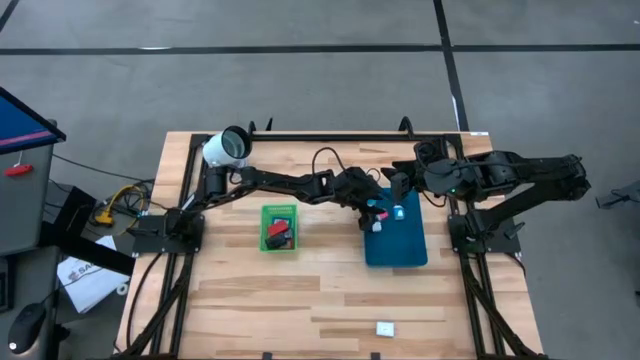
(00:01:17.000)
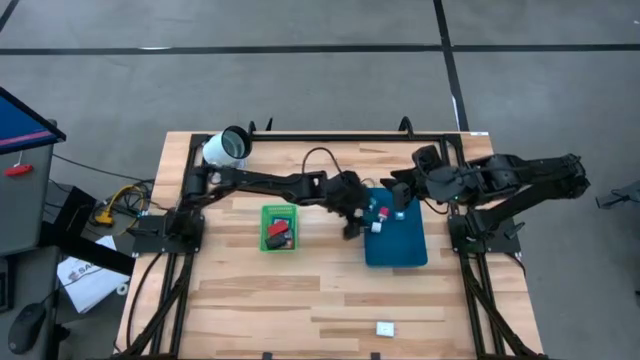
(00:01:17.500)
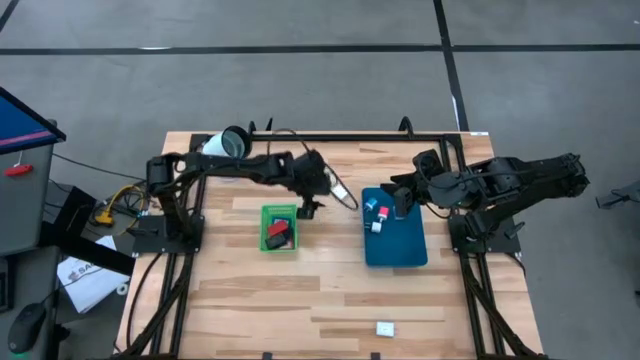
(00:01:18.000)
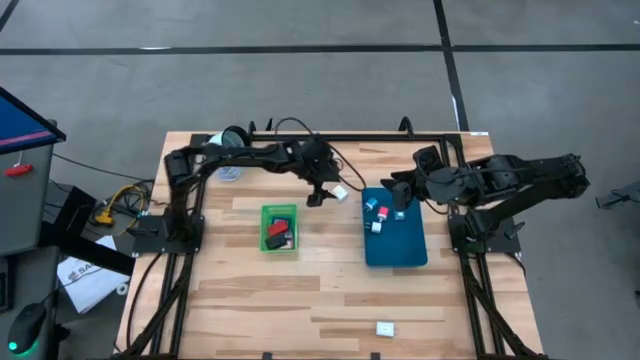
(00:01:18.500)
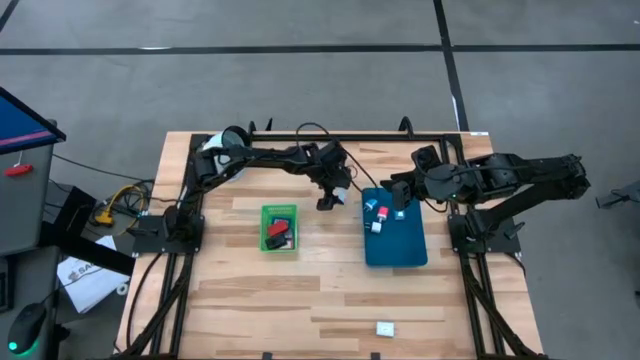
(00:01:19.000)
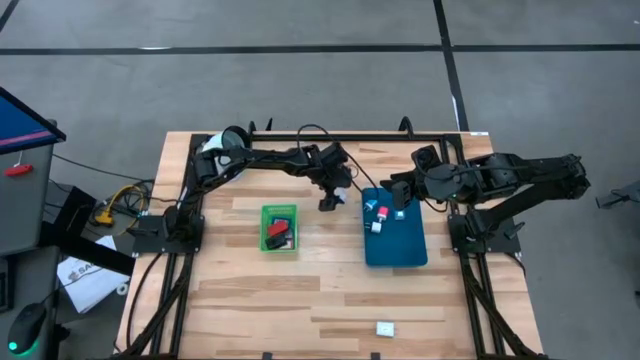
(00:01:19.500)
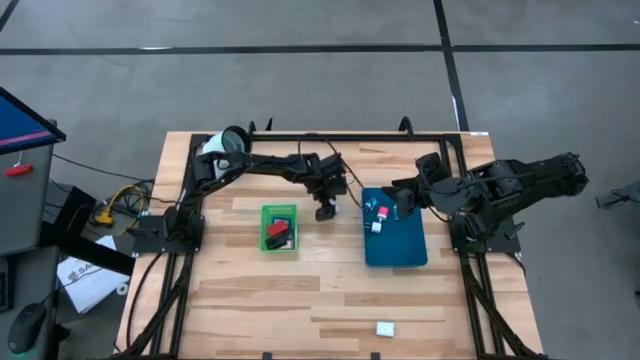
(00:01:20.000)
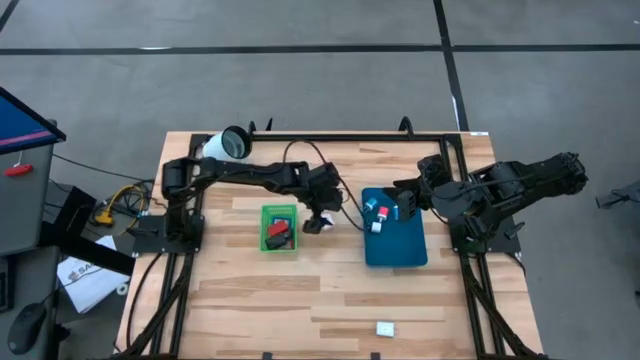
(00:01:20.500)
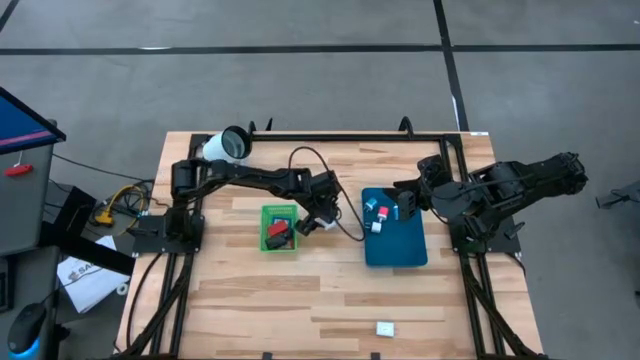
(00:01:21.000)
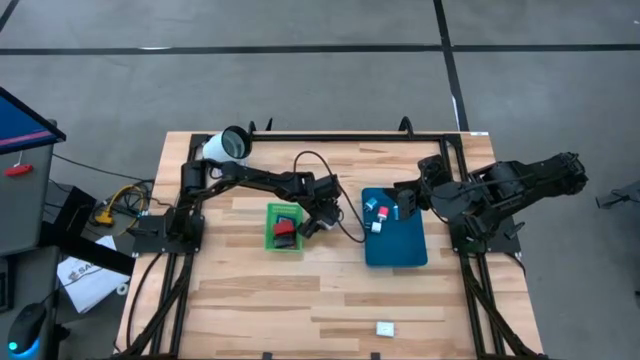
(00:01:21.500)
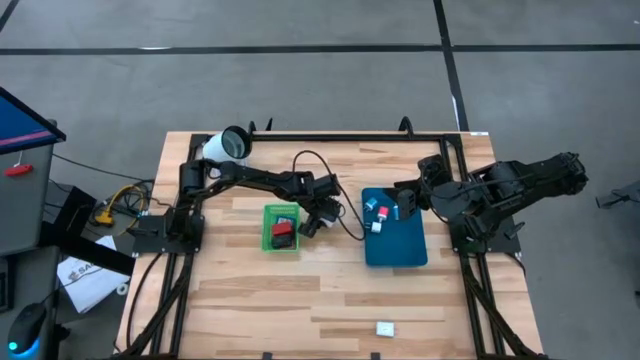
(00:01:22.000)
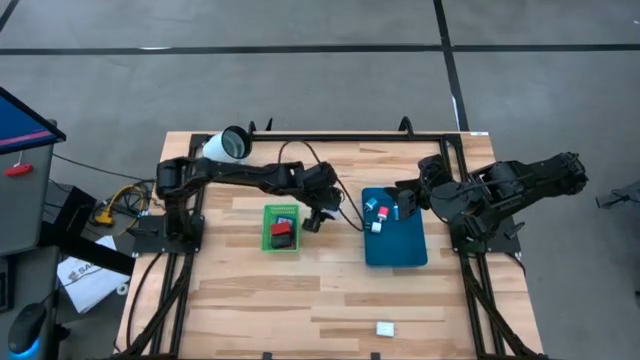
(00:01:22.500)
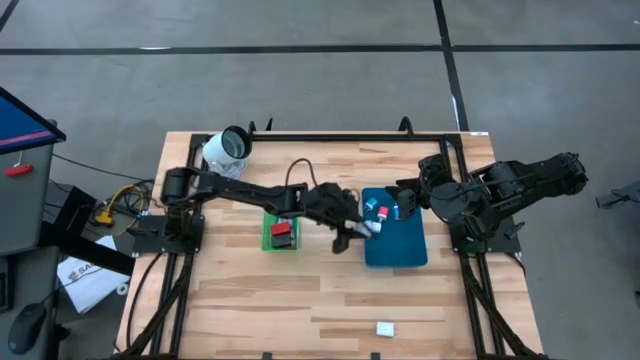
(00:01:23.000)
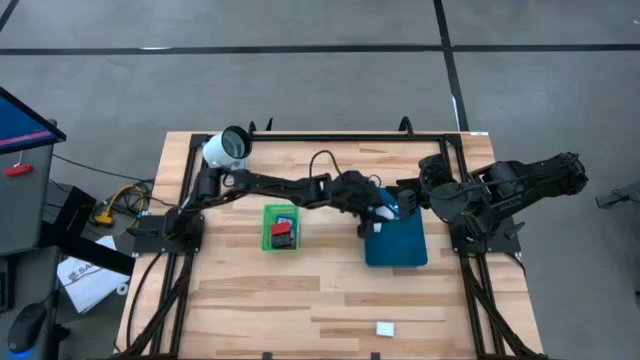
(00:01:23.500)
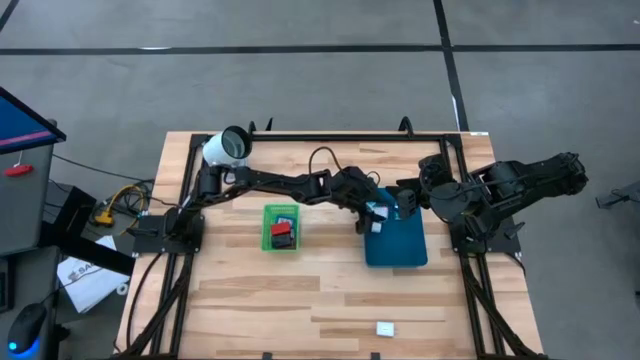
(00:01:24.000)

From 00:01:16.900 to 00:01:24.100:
Task: Pick & Place Office items
Put the top white charger adapter into the blue bin

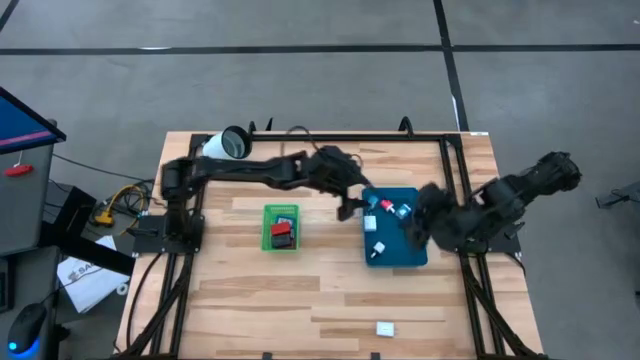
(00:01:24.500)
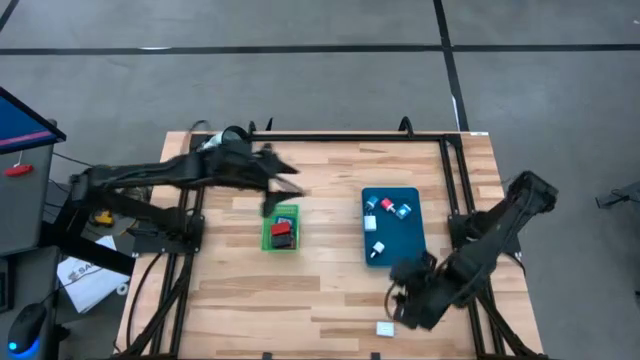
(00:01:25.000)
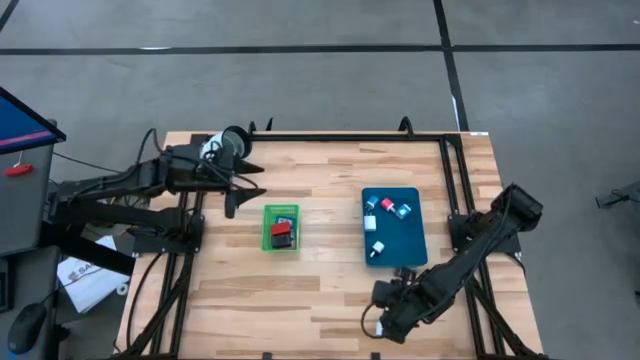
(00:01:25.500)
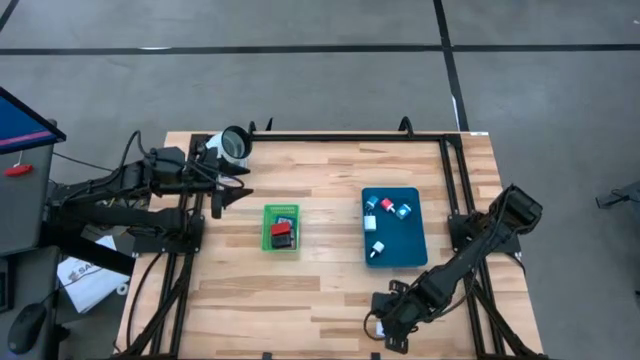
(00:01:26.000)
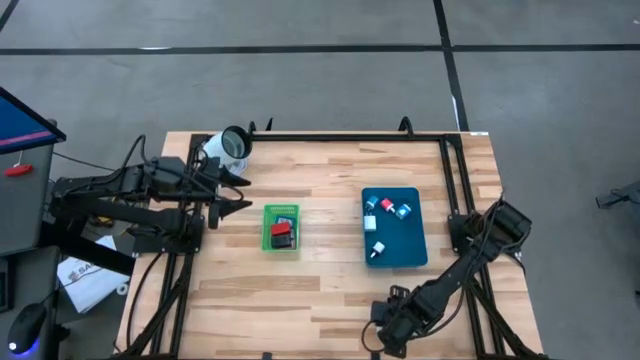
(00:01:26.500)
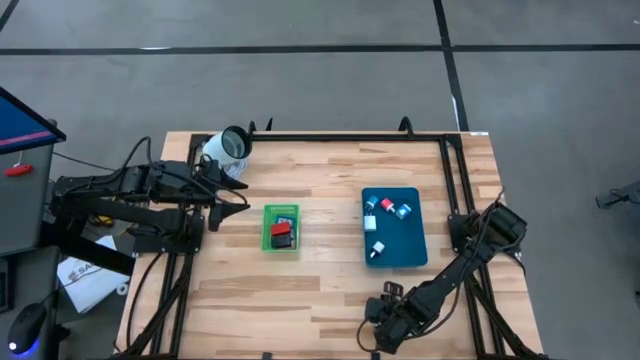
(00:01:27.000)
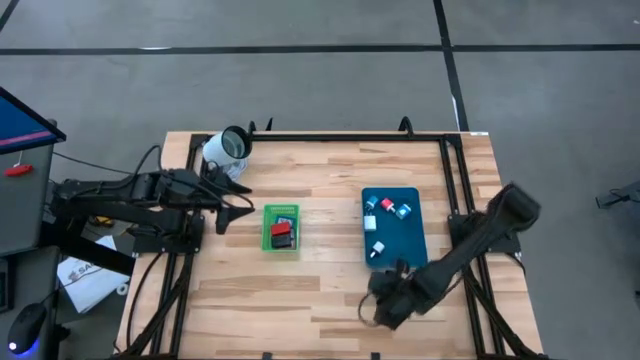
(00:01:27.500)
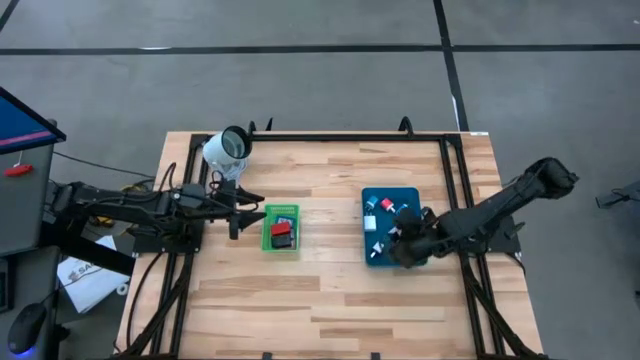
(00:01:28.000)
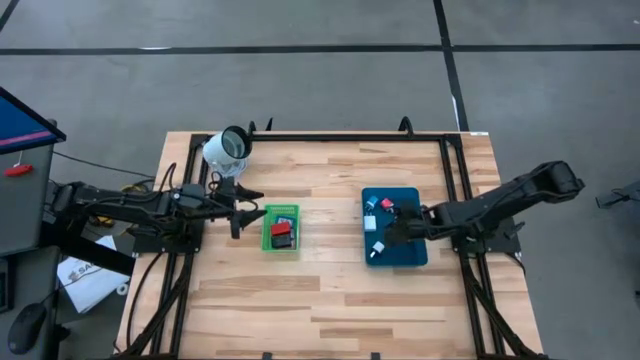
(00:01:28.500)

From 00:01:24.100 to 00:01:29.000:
Put the white charger adapter into the blue bin

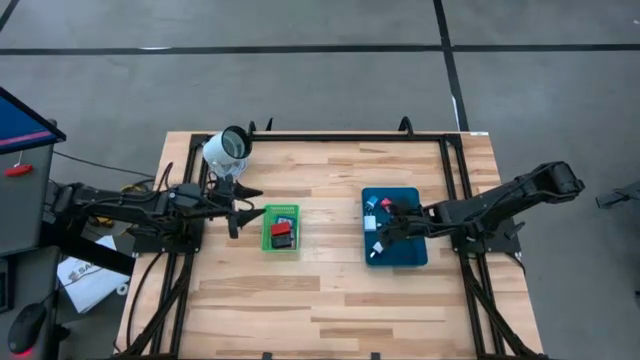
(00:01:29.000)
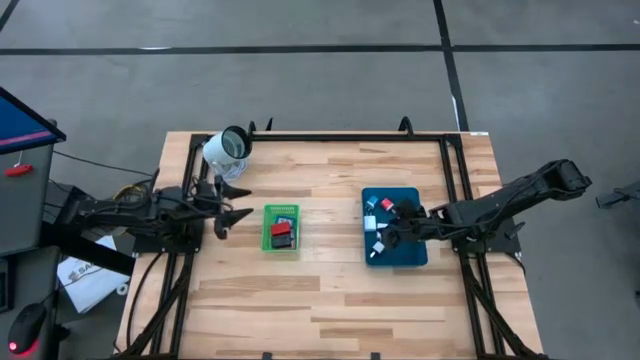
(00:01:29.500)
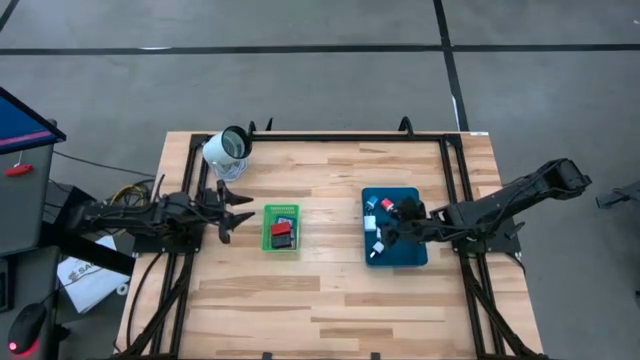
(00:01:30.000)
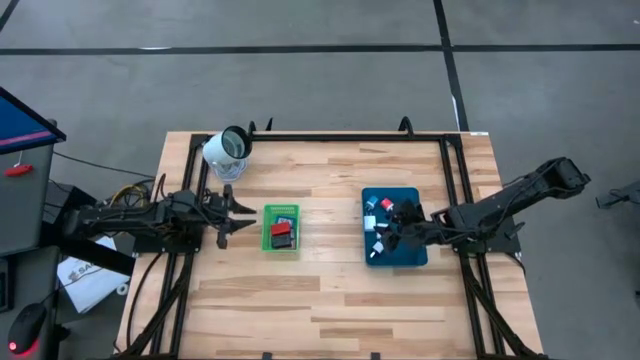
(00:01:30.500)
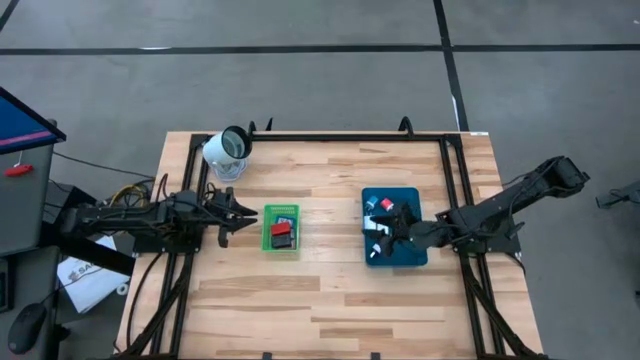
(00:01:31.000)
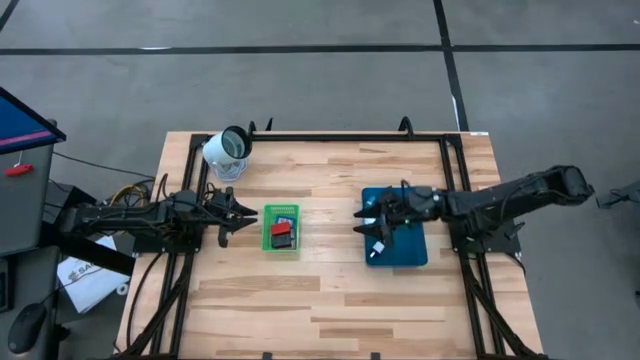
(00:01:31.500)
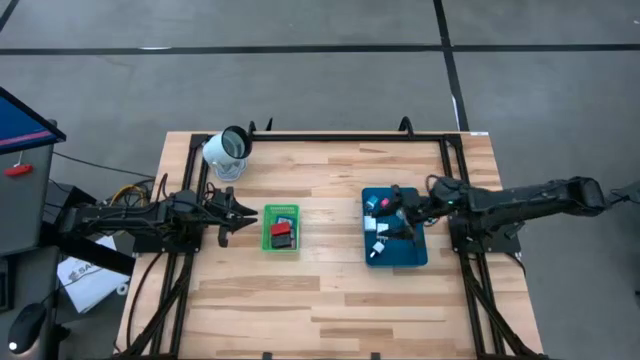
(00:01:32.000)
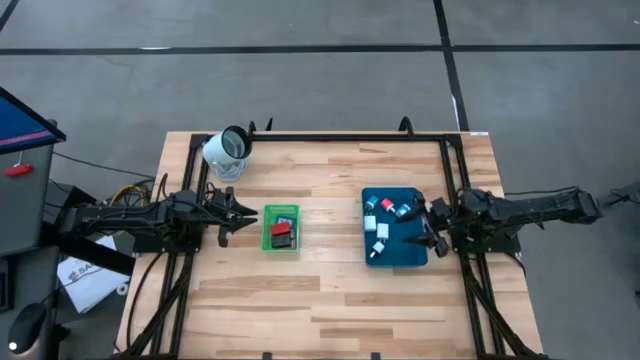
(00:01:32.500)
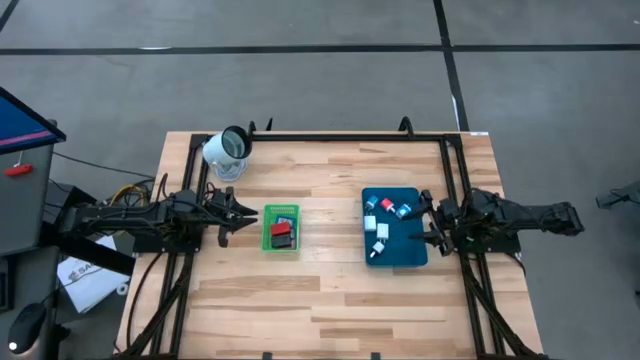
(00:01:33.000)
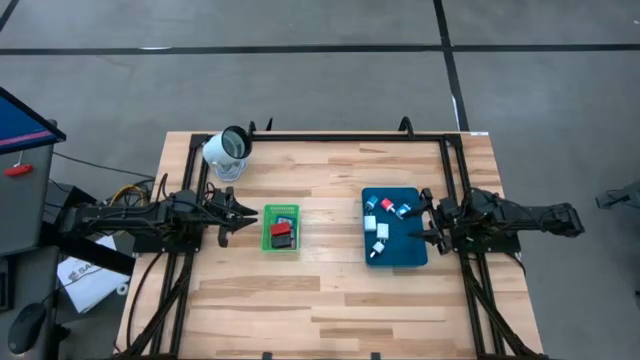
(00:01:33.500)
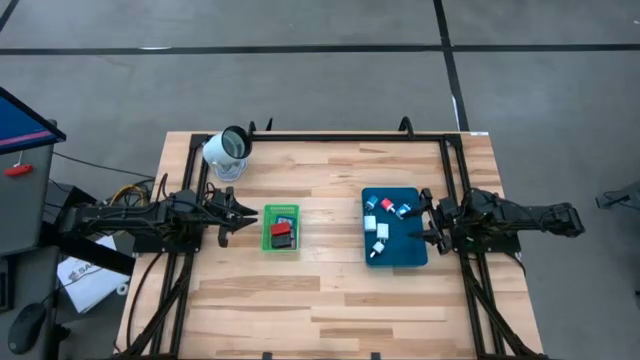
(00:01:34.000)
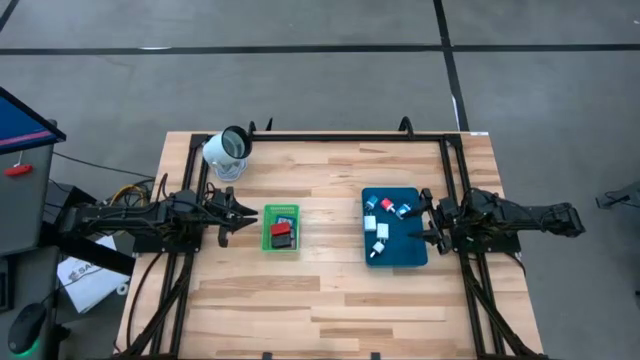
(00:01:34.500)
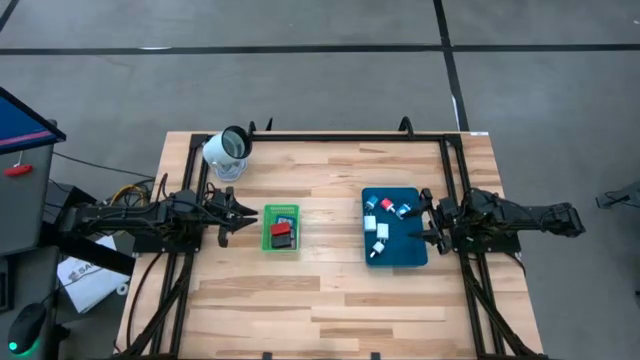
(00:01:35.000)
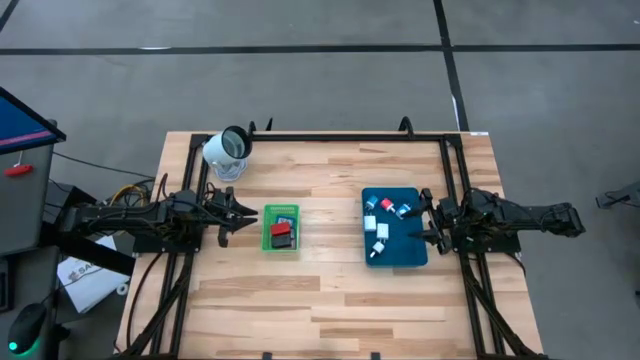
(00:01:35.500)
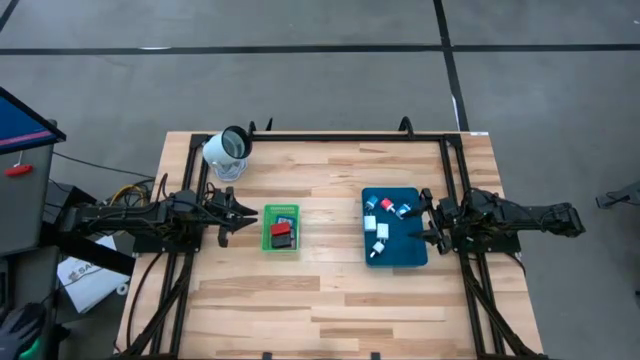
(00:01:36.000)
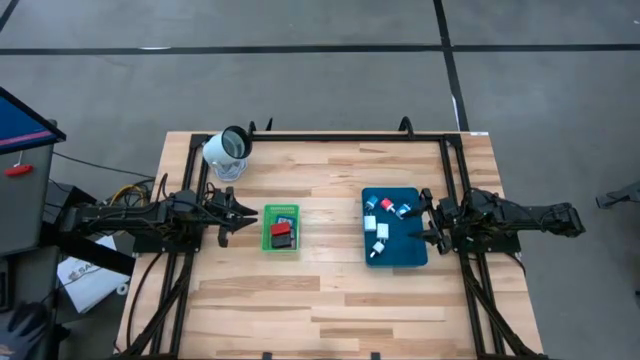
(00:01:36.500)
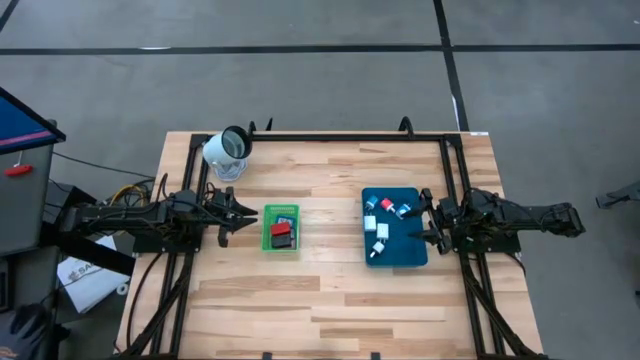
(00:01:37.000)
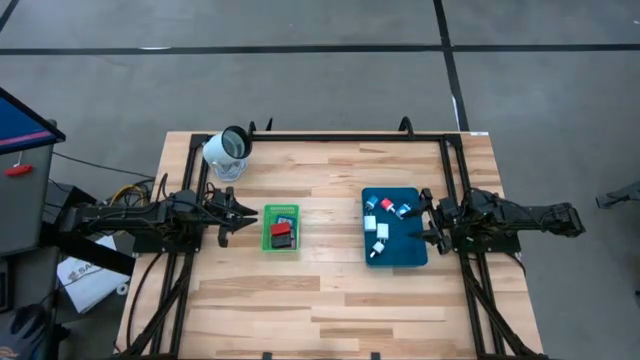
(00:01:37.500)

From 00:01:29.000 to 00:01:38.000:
Return to Home Position

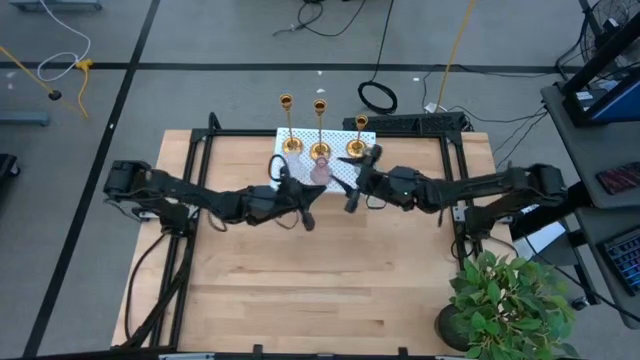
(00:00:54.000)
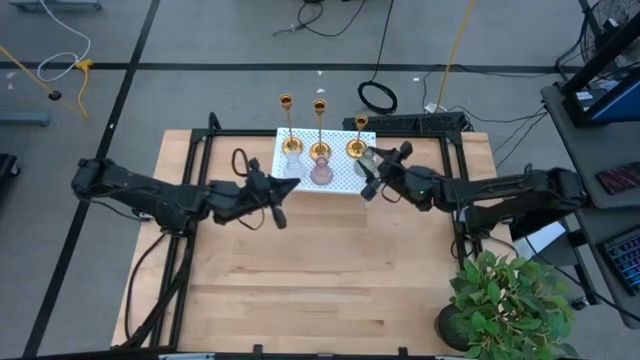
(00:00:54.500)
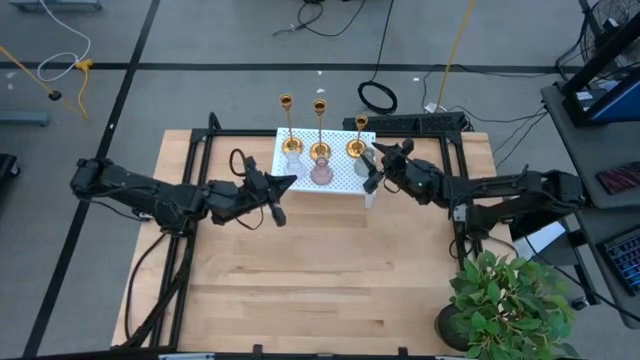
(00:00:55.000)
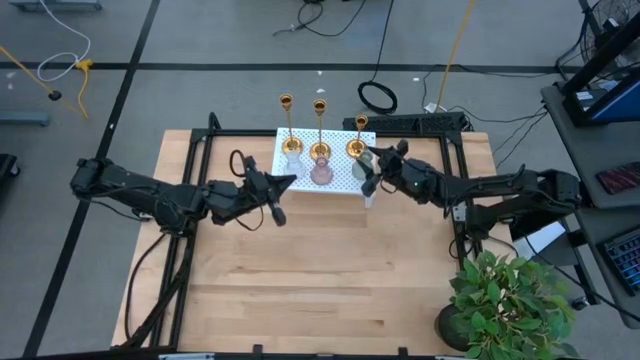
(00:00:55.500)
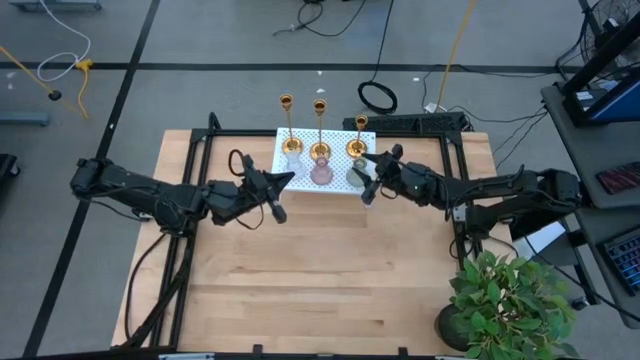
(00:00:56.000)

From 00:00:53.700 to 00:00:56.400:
Task: Pick & Place candle stick holders
Adjust the green vase on the shelf
